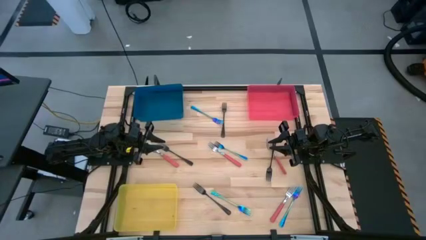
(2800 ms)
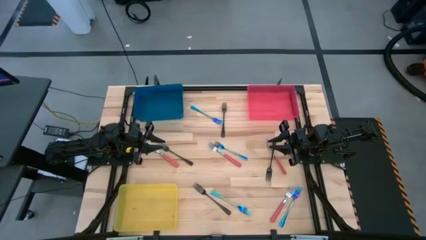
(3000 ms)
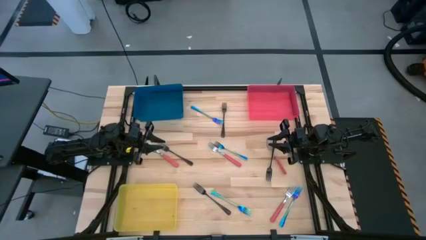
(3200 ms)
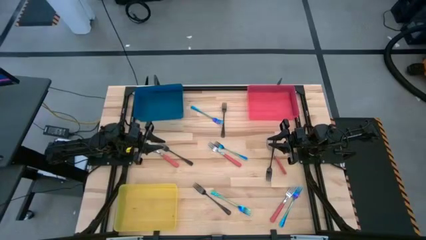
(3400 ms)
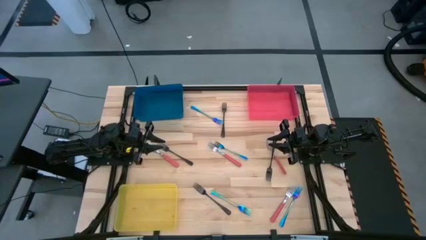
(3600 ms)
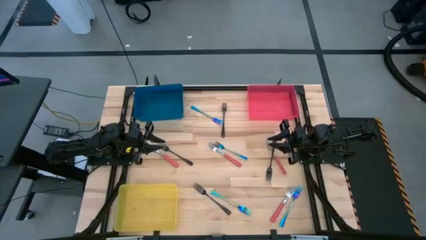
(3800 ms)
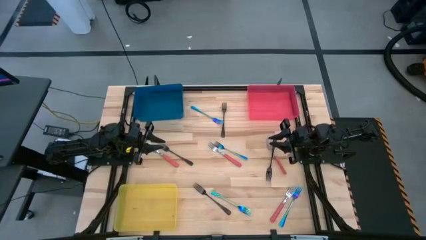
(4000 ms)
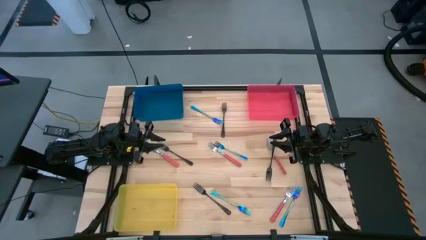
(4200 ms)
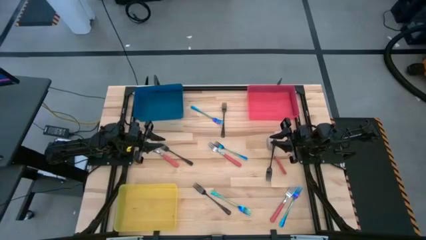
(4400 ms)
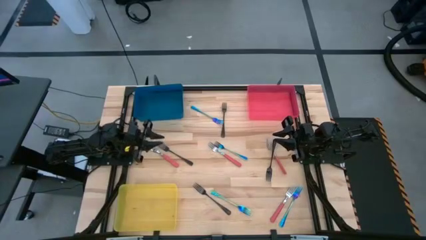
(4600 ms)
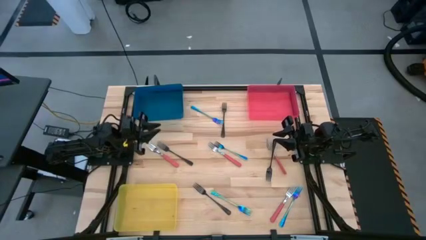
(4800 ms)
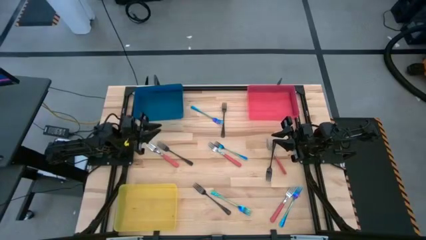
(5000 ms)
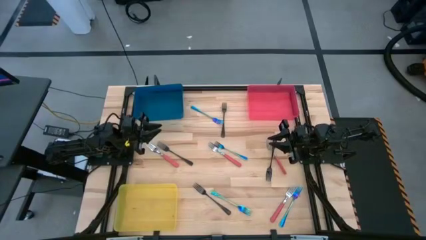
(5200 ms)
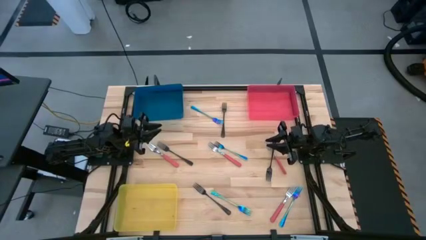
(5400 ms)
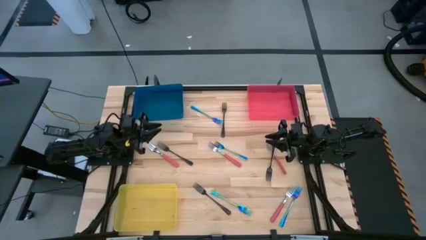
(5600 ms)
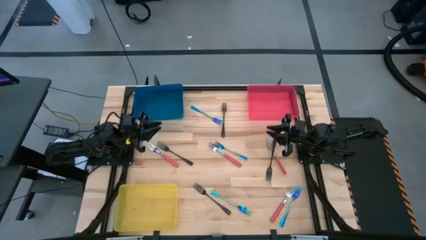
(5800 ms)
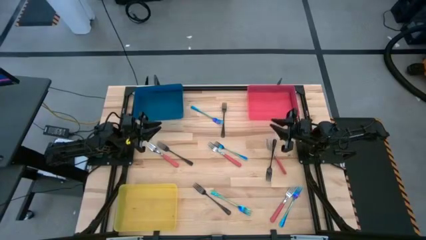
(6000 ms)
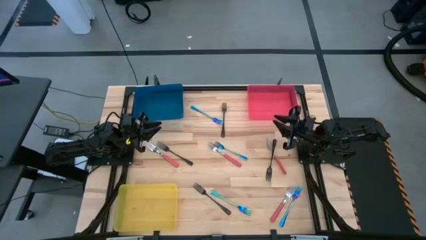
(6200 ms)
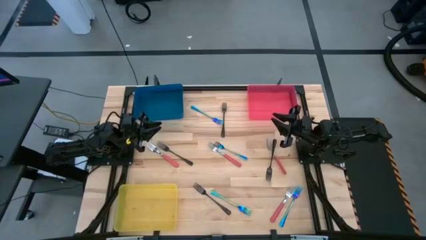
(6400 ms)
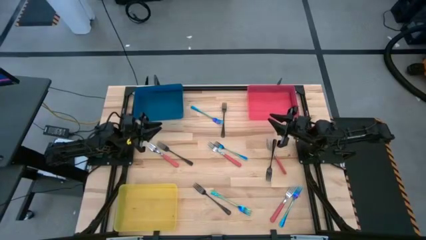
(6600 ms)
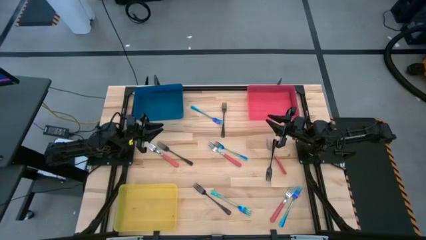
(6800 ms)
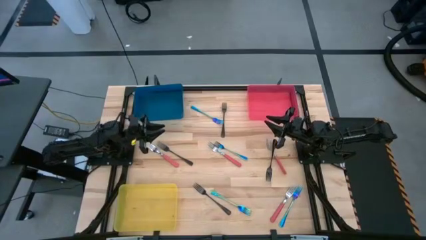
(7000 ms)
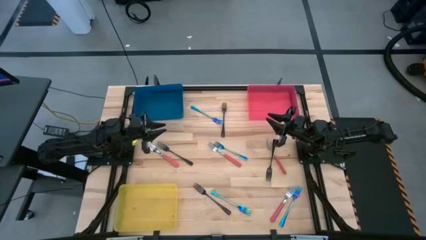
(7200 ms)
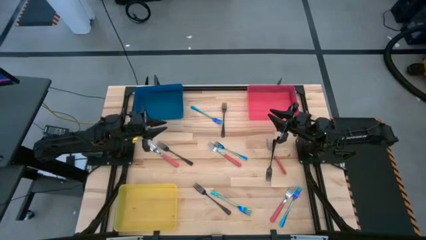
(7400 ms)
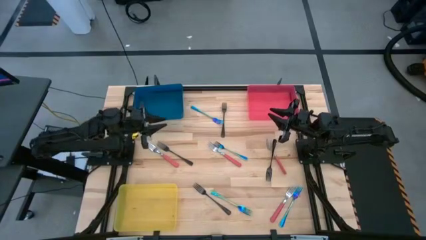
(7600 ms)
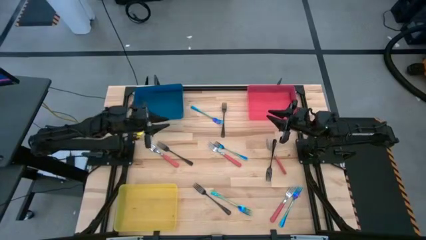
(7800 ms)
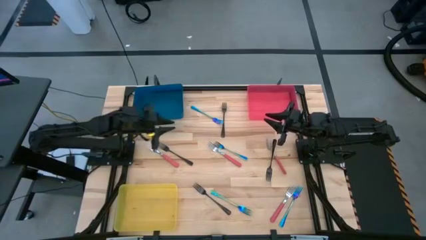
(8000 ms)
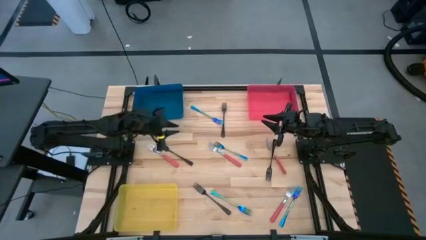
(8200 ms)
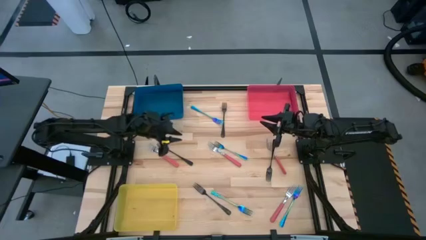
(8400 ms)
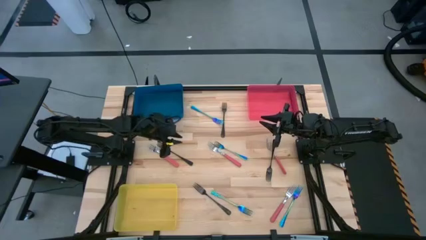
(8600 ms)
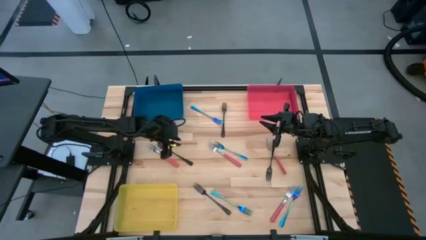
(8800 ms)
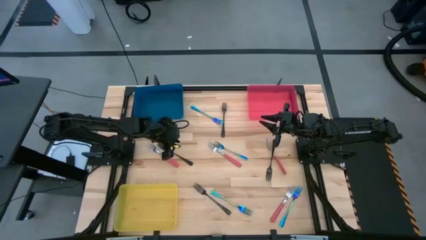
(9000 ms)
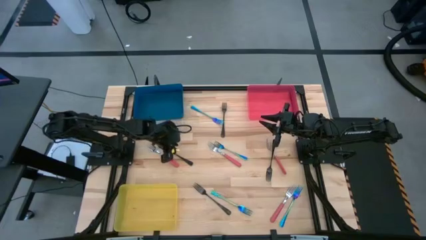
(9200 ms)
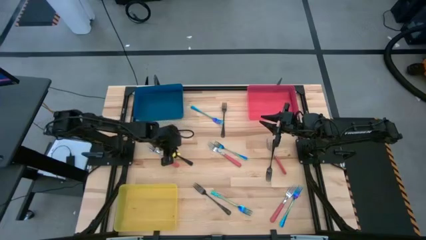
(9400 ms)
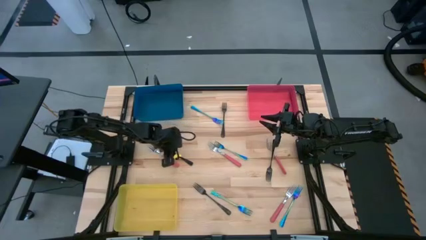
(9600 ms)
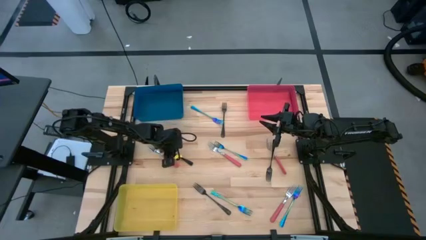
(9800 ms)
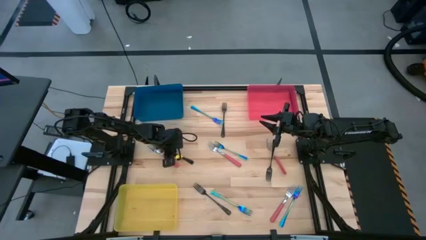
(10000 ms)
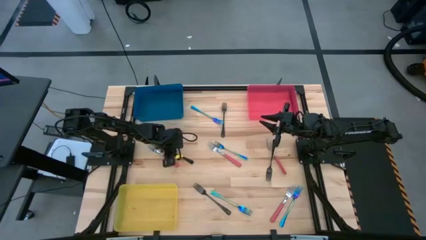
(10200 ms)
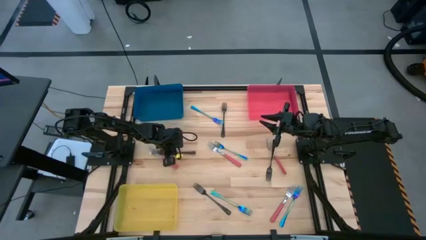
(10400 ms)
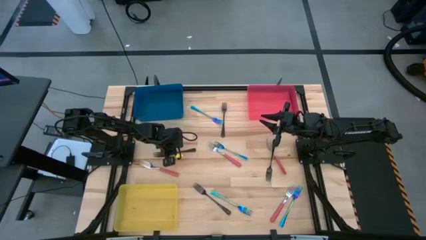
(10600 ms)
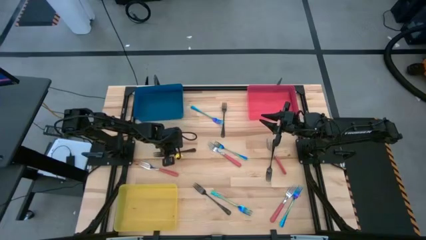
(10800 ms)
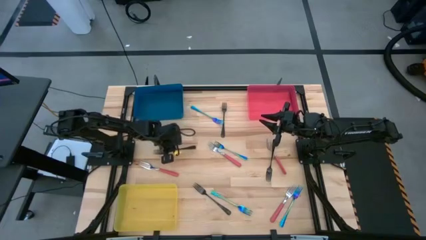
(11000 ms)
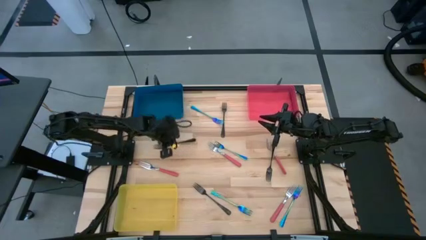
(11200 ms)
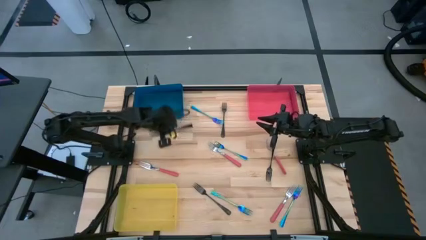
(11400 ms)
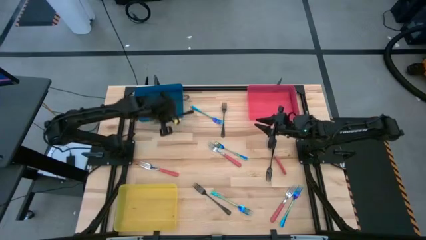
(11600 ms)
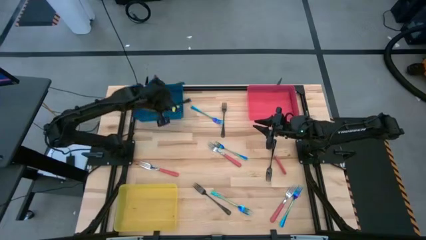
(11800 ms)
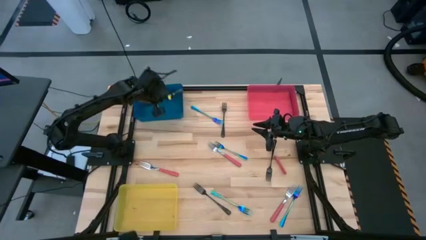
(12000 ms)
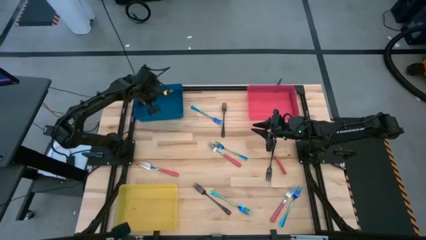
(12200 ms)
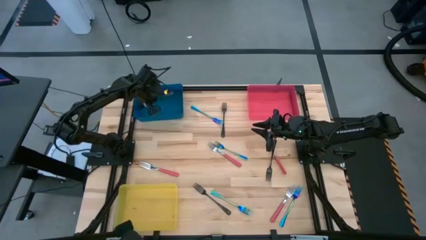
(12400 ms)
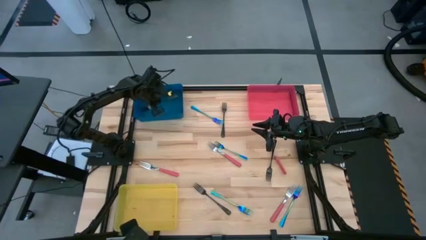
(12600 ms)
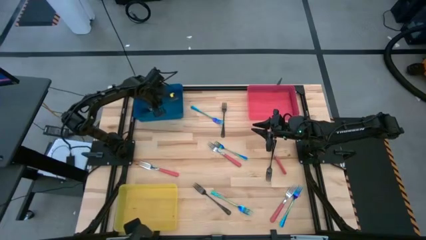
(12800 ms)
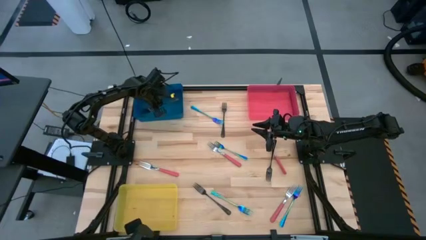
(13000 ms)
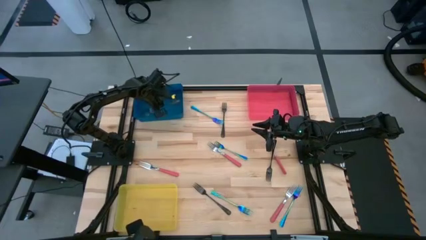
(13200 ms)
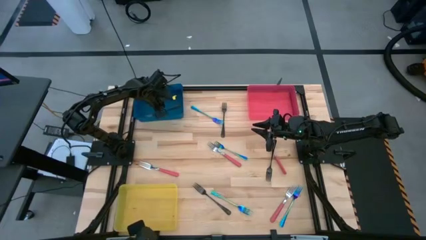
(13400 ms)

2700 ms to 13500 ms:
Task: Sort silverware by color (type)
Put the middle left black fork into the blue bin

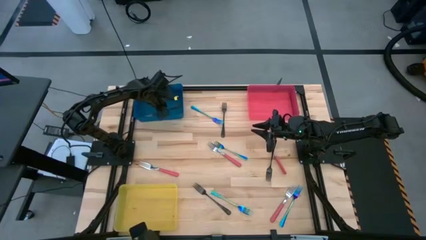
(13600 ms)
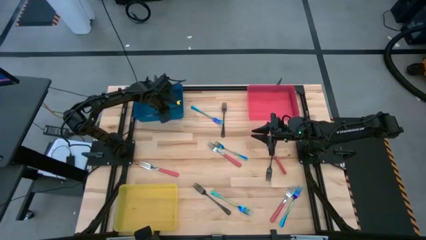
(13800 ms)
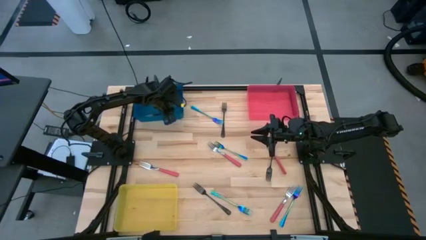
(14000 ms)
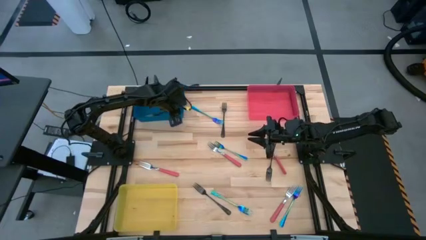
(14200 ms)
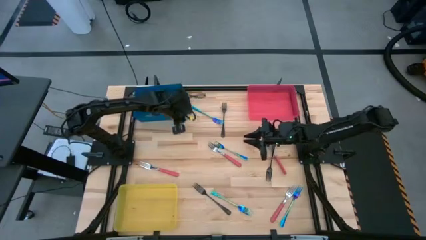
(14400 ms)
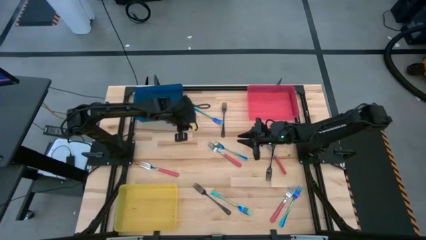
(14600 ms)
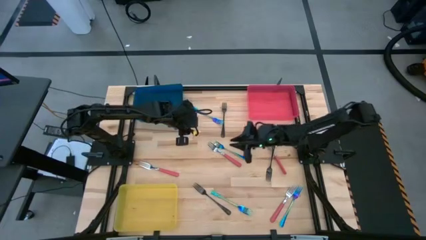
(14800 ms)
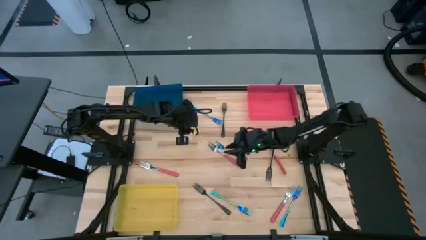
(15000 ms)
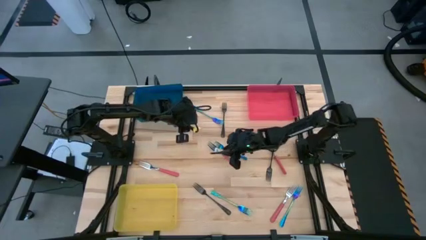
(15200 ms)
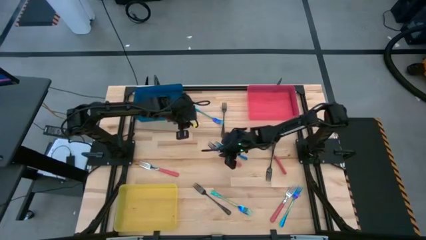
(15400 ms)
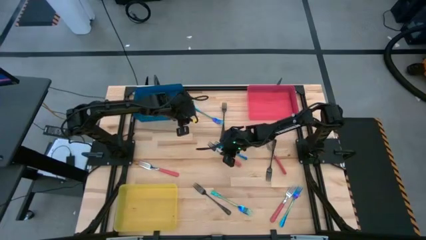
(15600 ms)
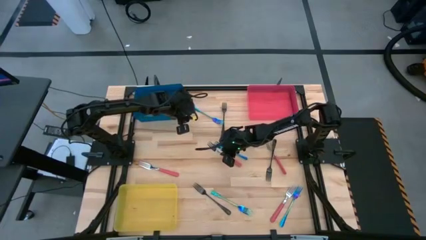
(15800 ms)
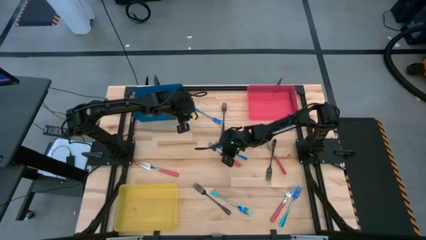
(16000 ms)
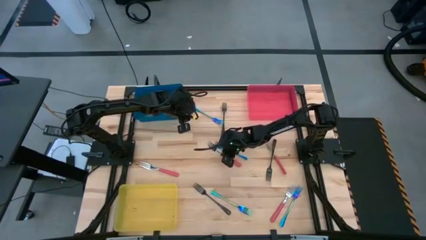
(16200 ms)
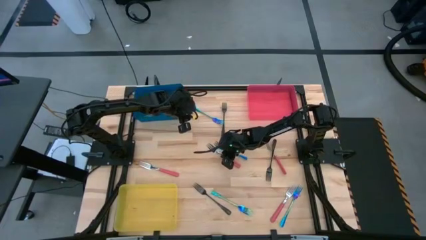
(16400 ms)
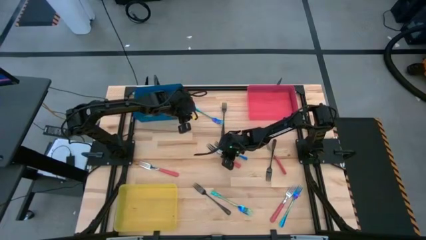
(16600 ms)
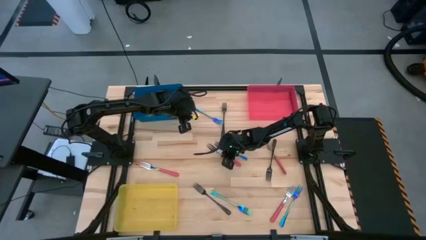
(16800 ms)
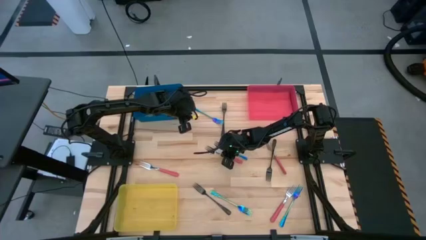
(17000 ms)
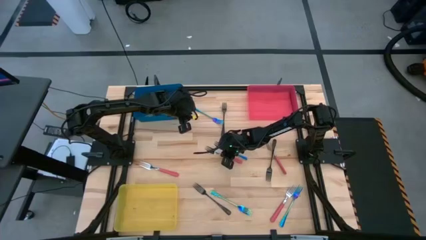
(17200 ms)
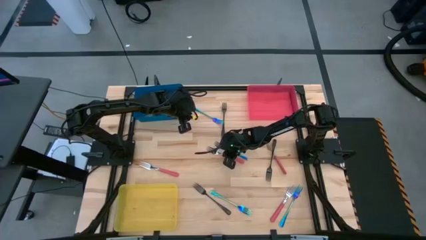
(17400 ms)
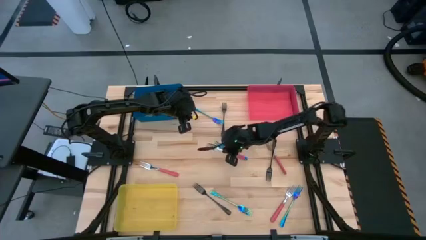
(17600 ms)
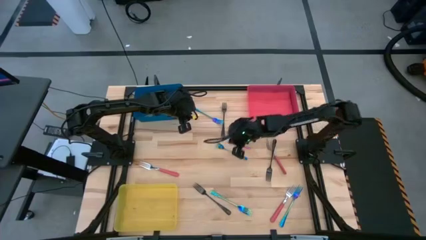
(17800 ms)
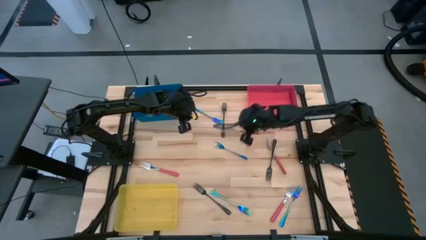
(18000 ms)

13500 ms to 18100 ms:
Put the top center pink fork into the pink bin

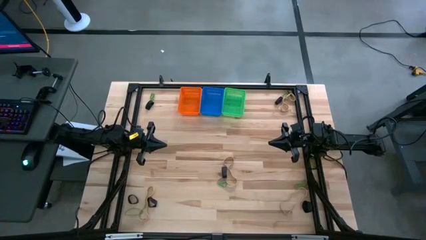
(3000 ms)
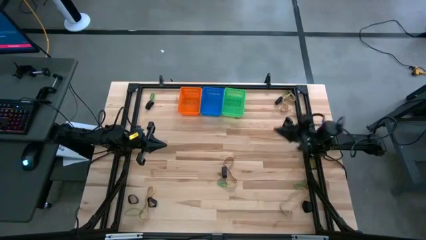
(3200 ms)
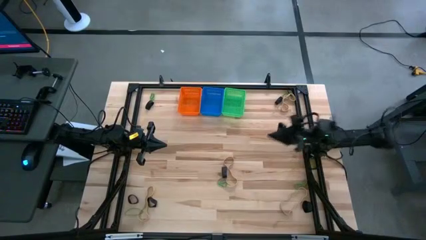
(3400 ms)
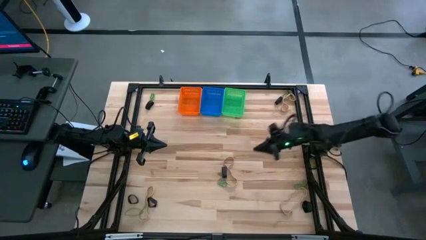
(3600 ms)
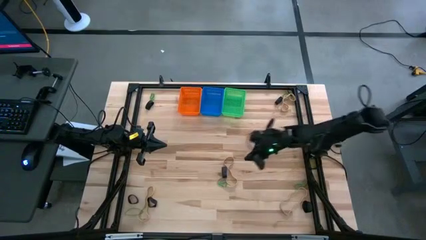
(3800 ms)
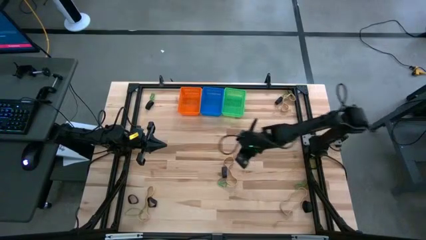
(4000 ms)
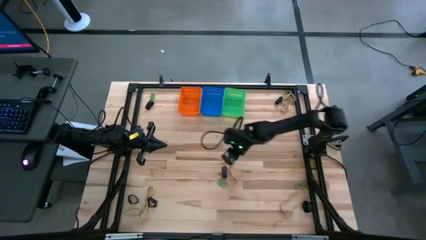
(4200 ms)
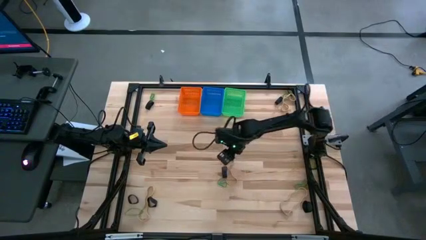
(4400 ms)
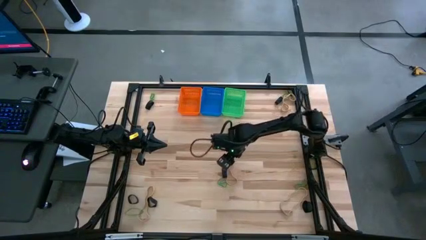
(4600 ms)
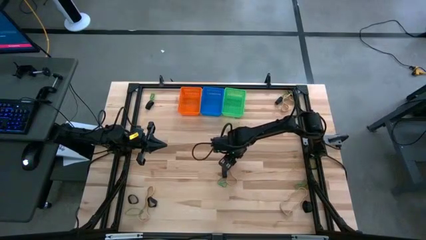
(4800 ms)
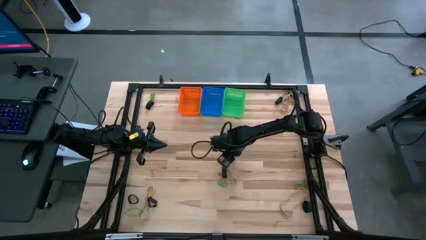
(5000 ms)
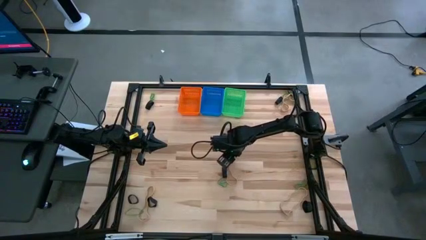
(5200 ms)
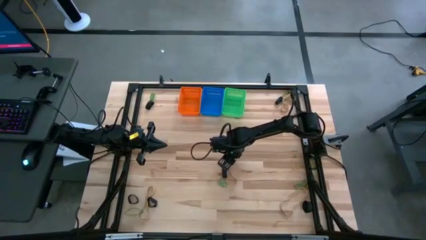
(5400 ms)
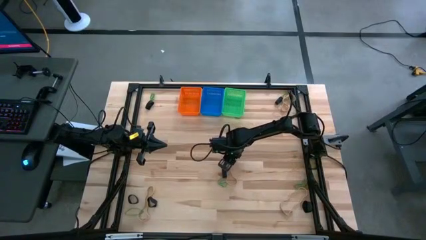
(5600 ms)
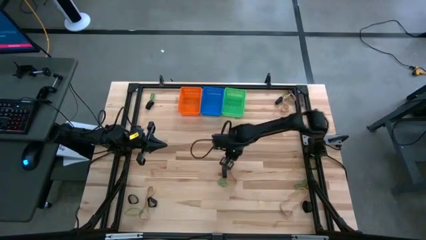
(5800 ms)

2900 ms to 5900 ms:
Task: Sort rubber bands into baskets
Put the brown rubber band into the green bin
